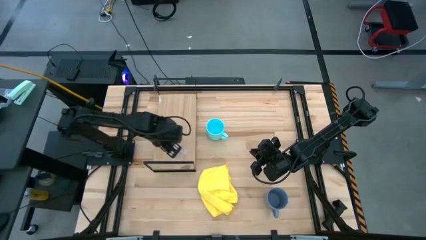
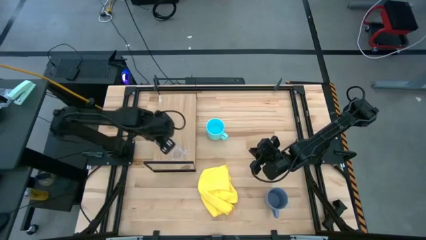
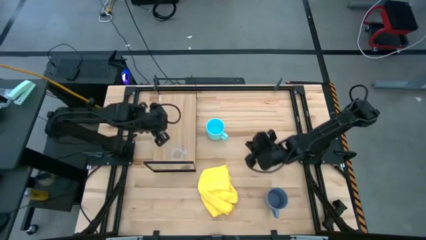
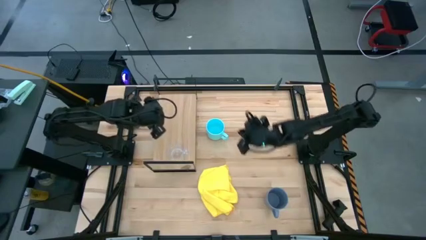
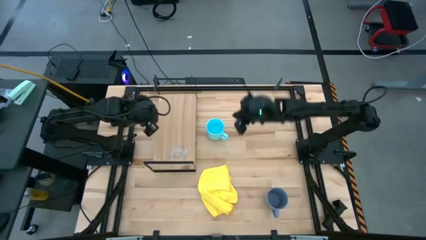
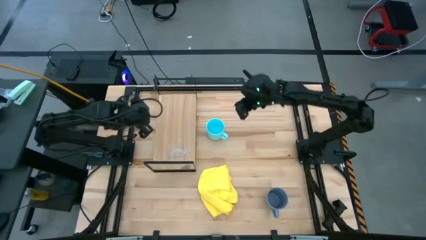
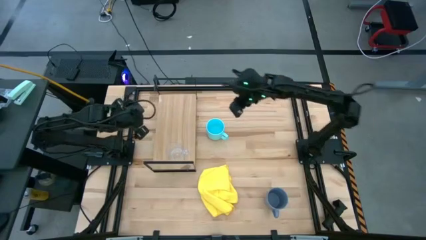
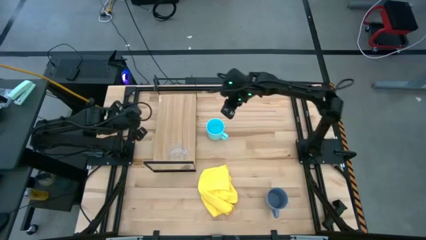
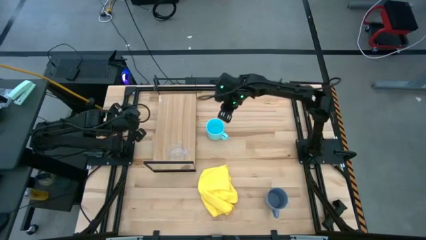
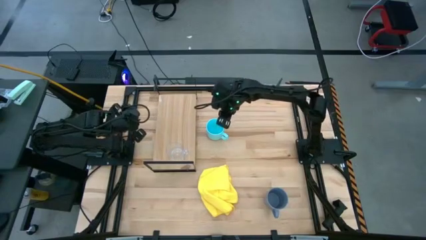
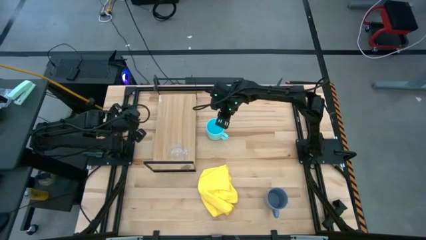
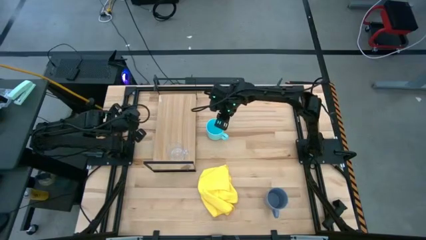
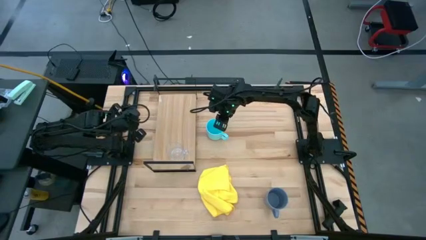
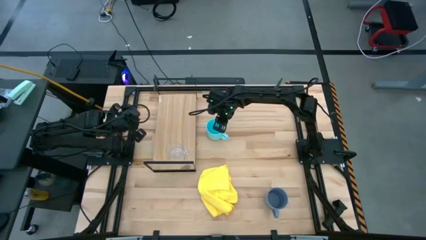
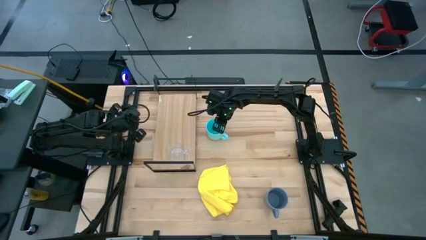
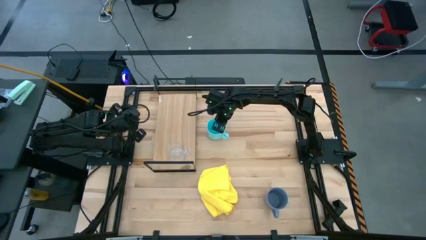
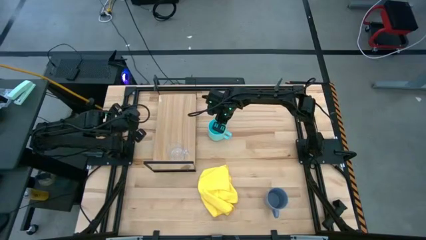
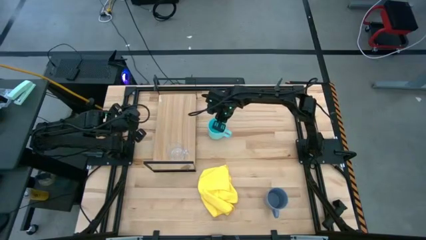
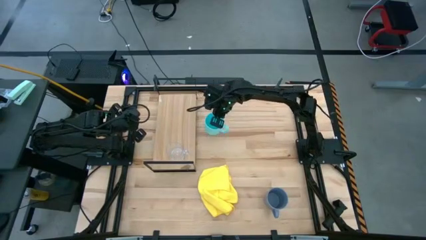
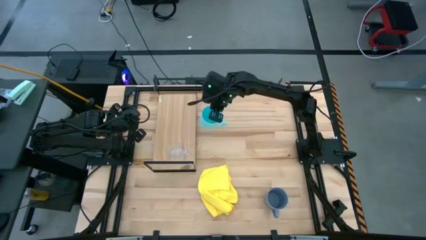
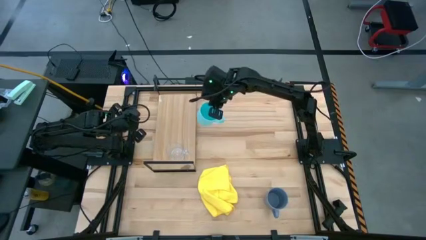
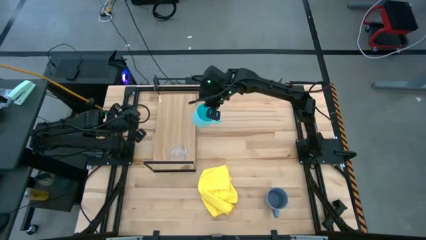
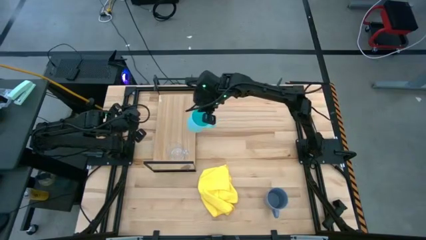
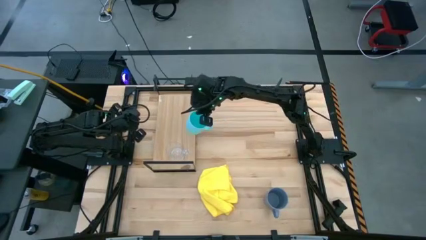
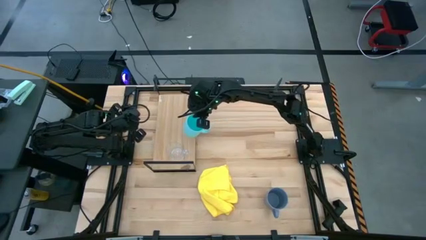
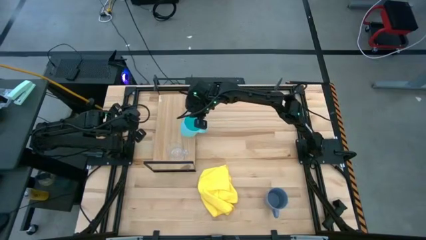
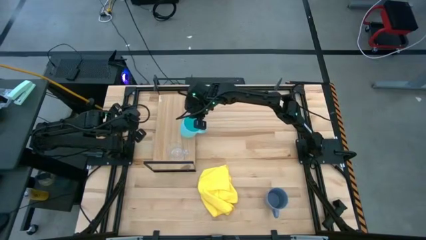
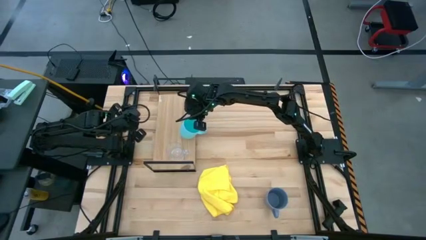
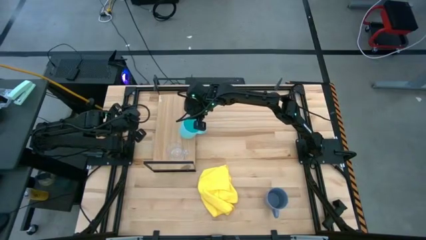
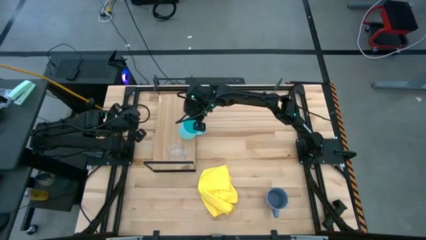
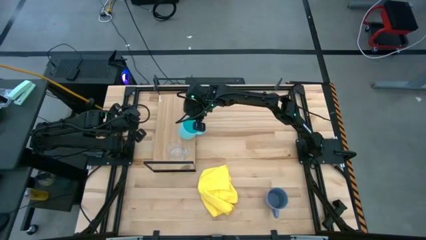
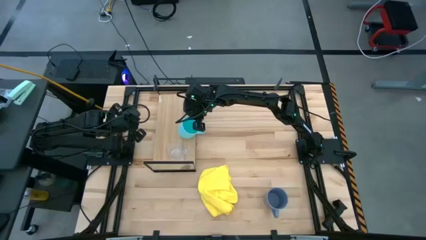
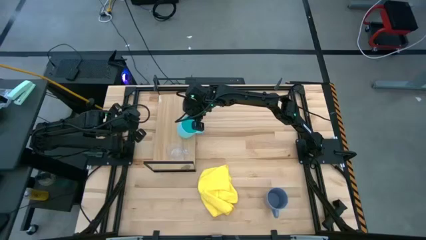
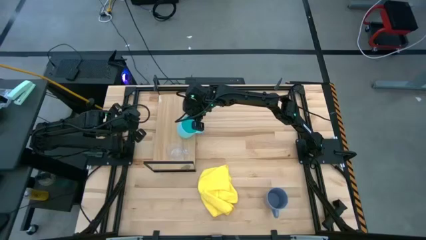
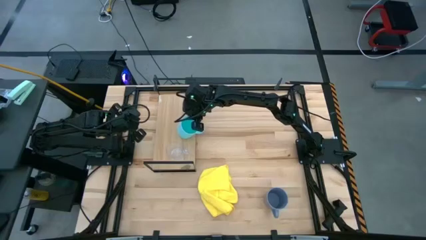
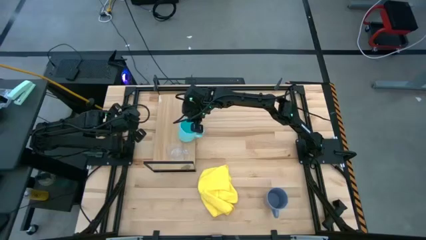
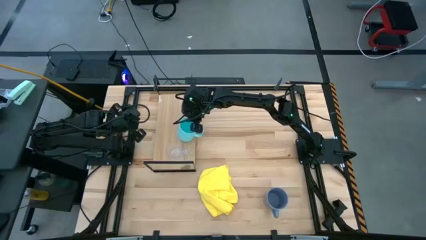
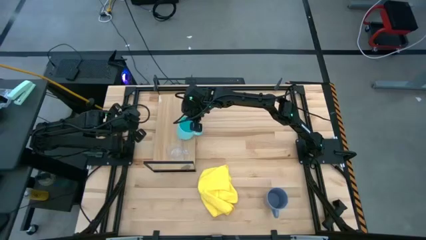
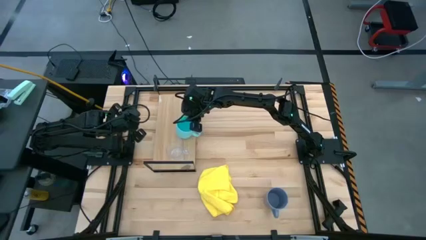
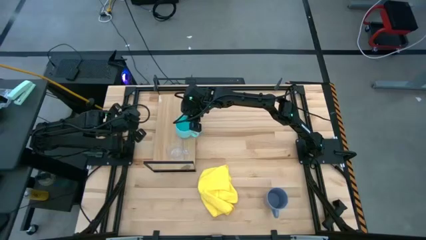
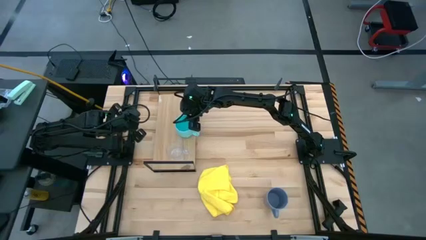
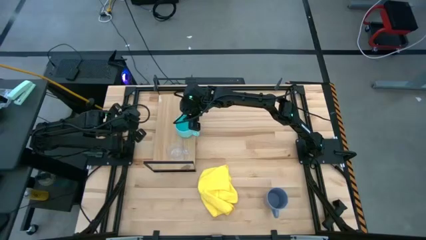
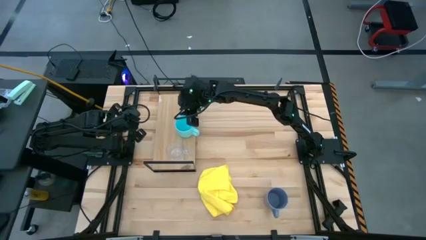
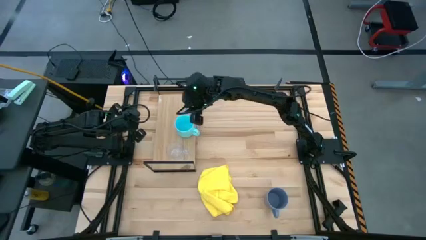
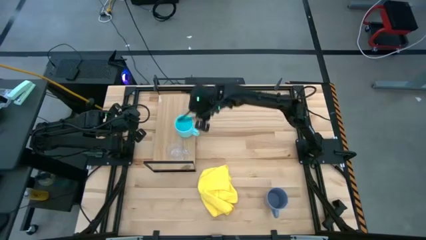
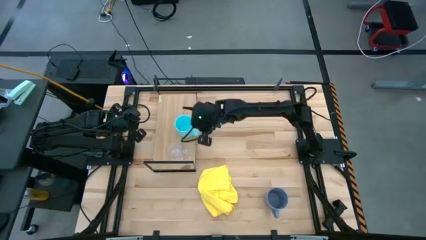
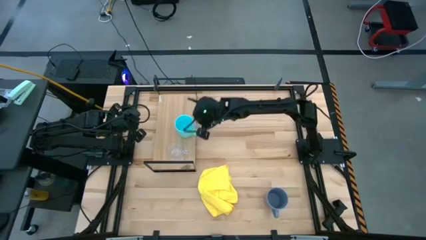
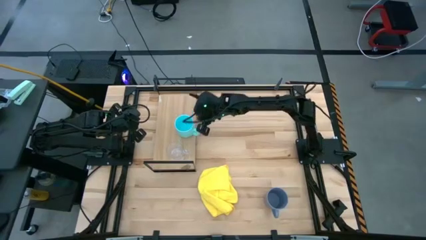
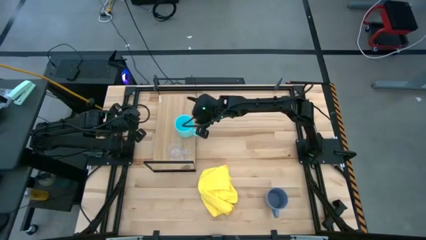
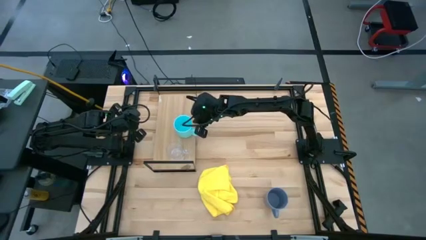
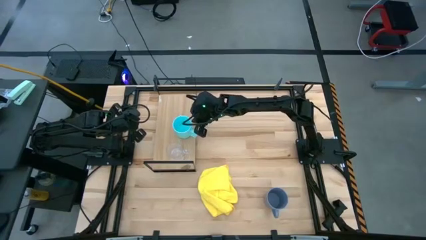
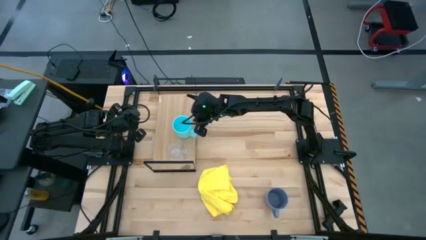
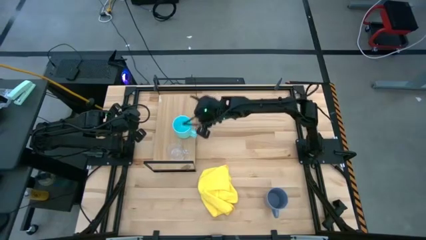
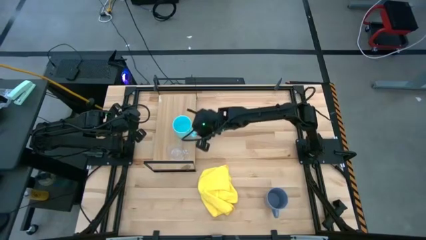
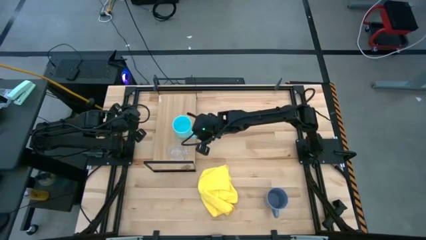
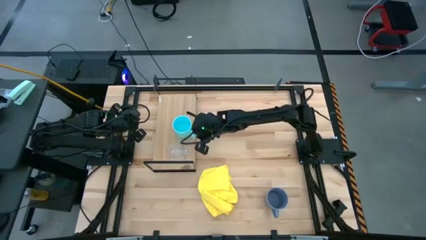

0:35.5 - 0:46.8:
Task: Stack small to large cups/mugs on shelf
Put the light blue mug on the shelf
